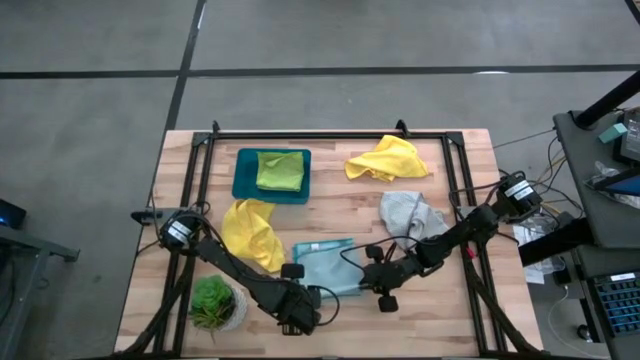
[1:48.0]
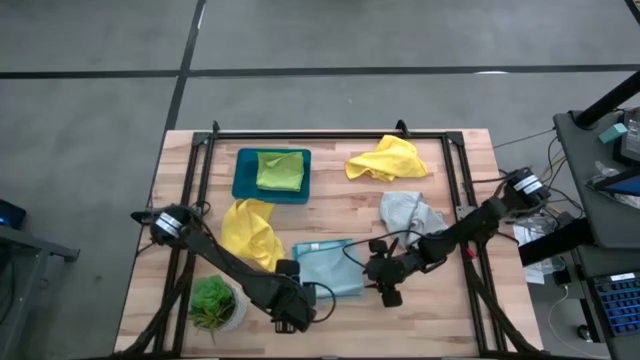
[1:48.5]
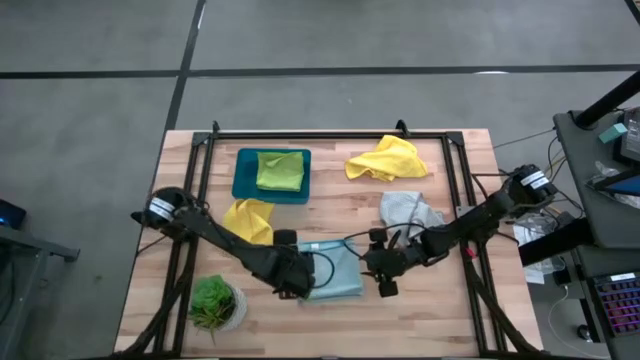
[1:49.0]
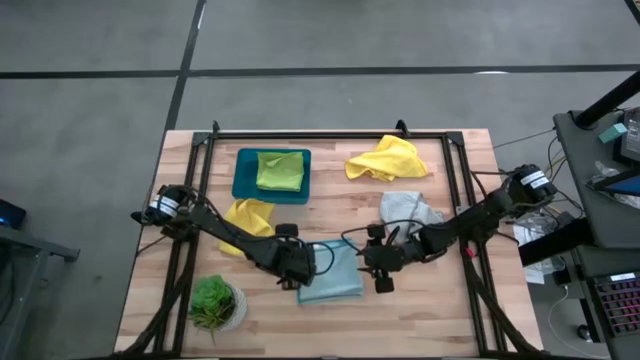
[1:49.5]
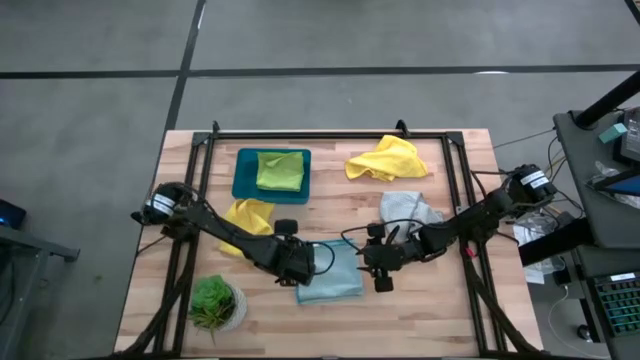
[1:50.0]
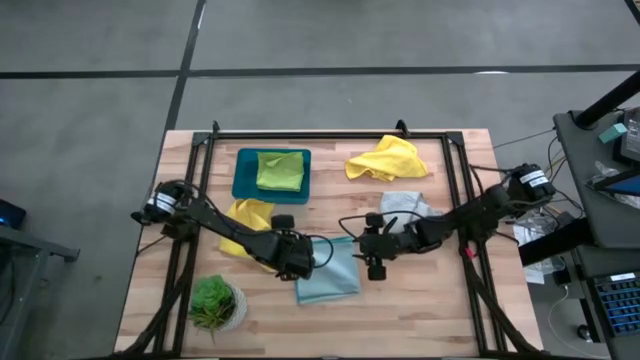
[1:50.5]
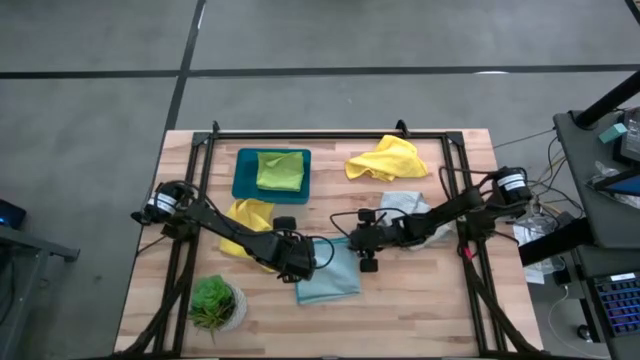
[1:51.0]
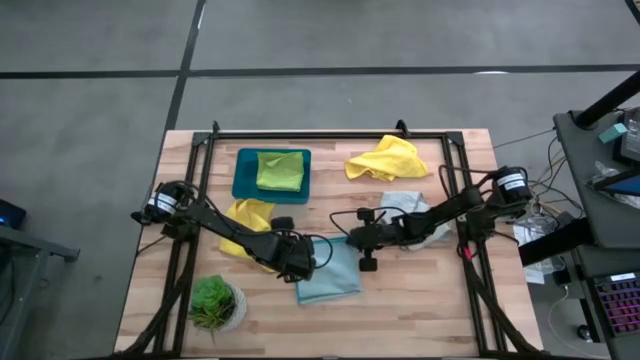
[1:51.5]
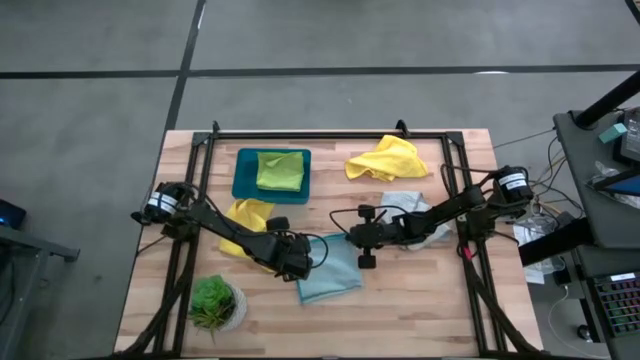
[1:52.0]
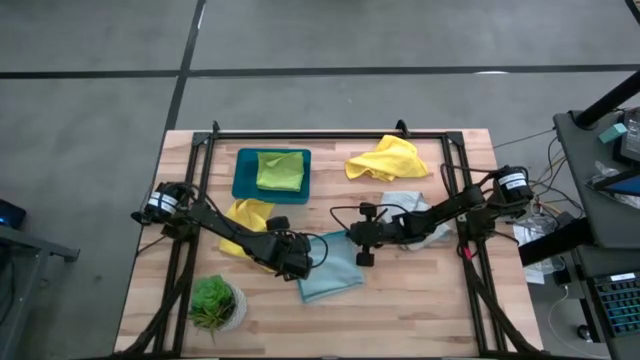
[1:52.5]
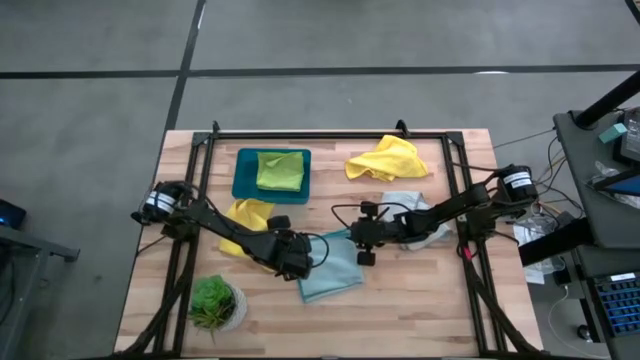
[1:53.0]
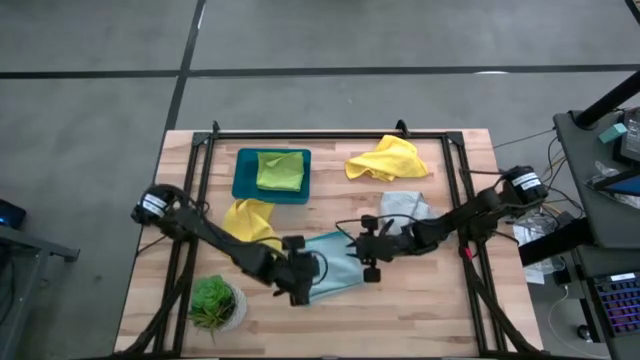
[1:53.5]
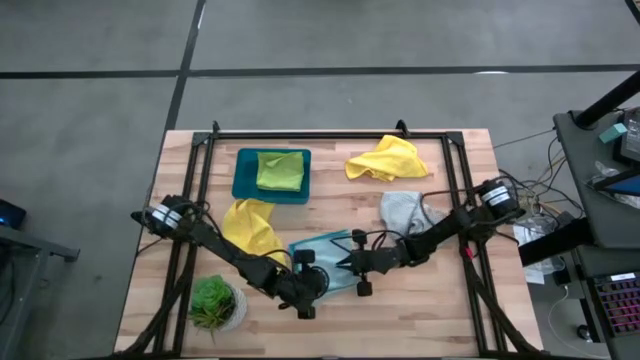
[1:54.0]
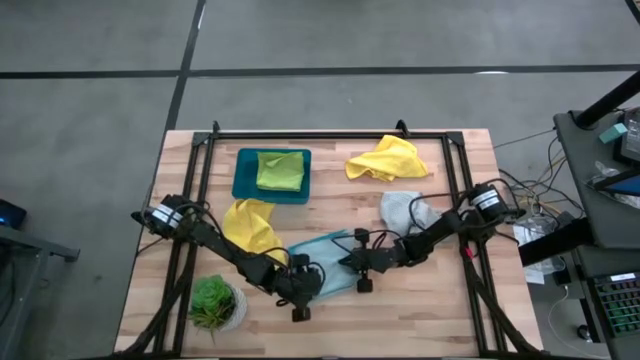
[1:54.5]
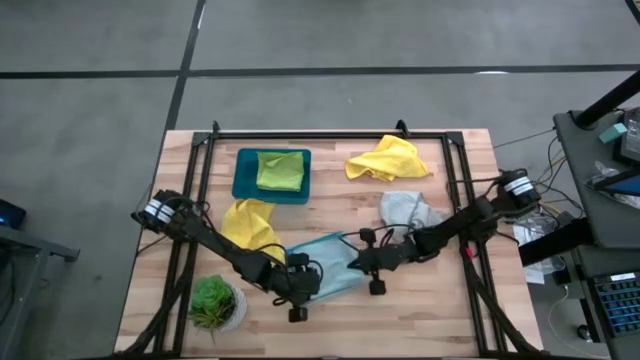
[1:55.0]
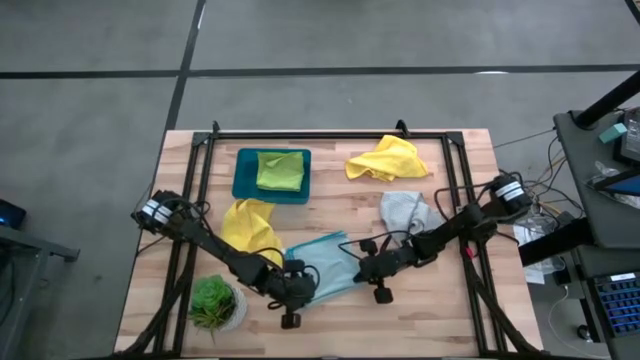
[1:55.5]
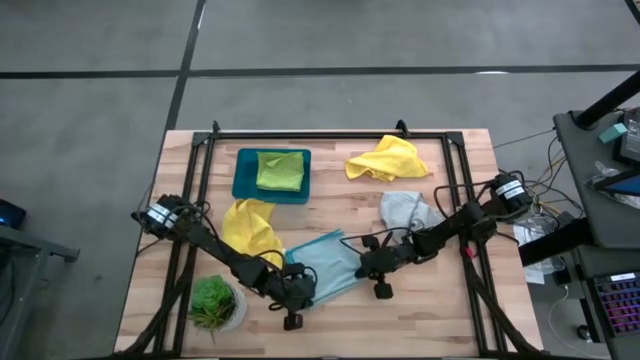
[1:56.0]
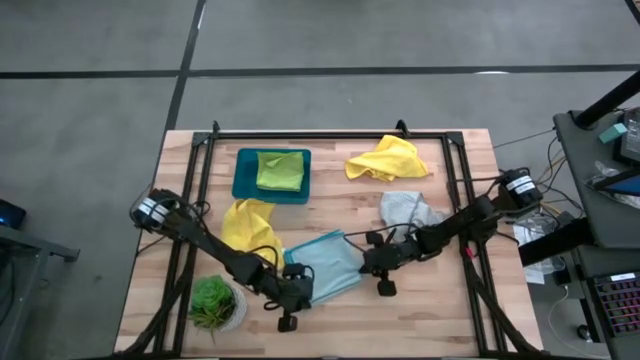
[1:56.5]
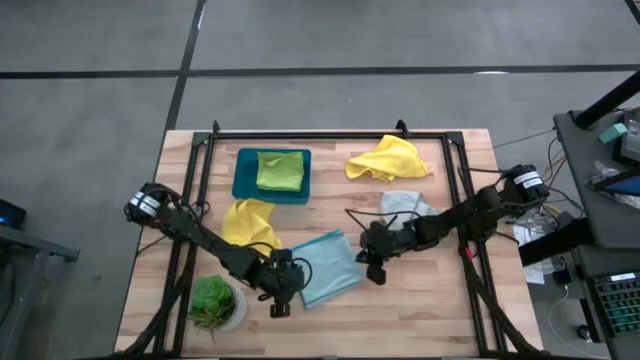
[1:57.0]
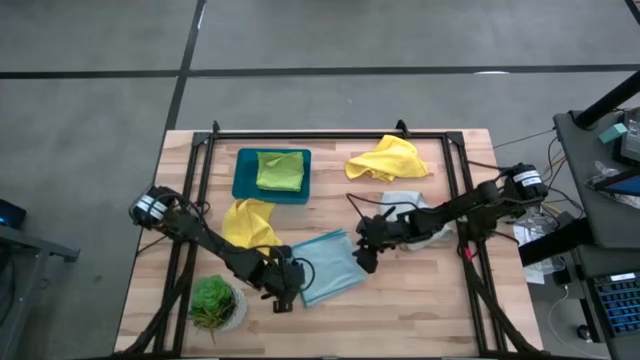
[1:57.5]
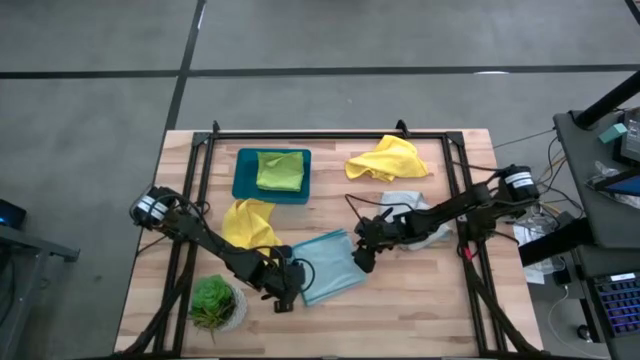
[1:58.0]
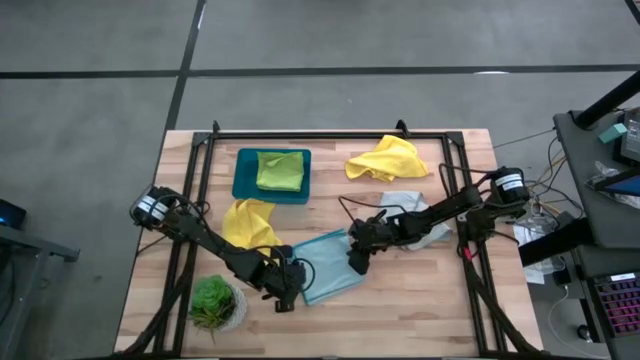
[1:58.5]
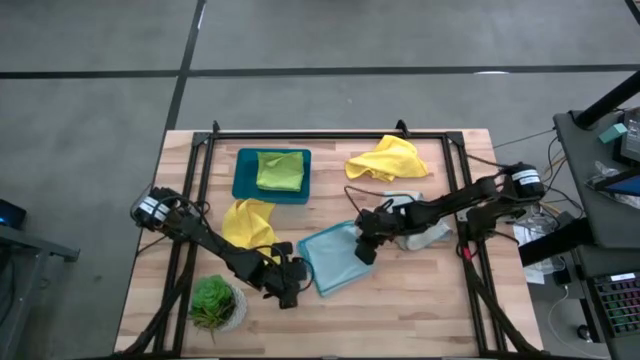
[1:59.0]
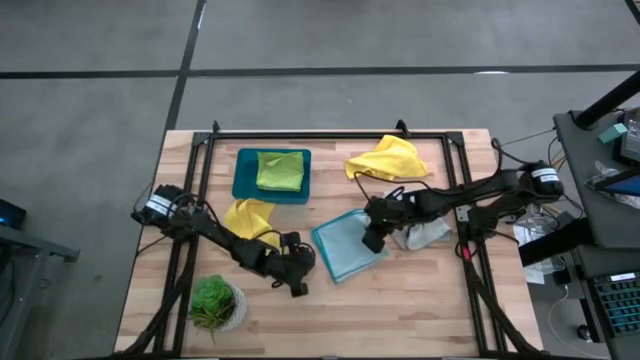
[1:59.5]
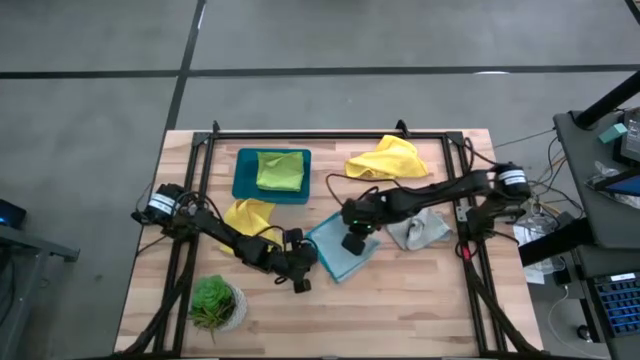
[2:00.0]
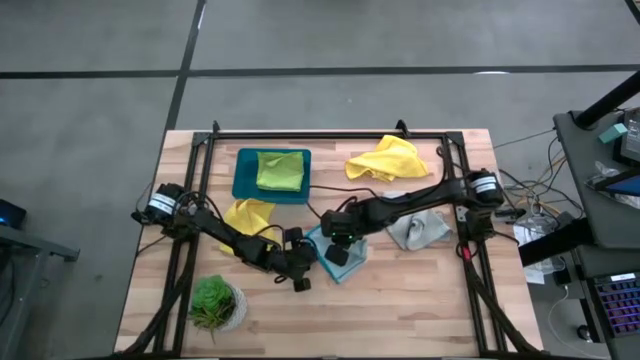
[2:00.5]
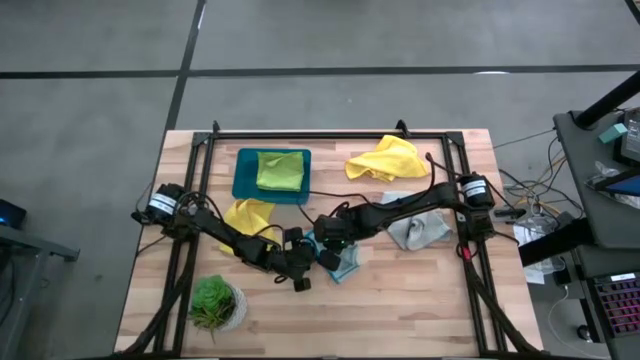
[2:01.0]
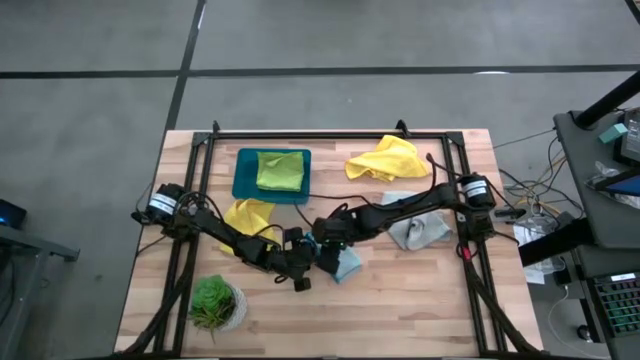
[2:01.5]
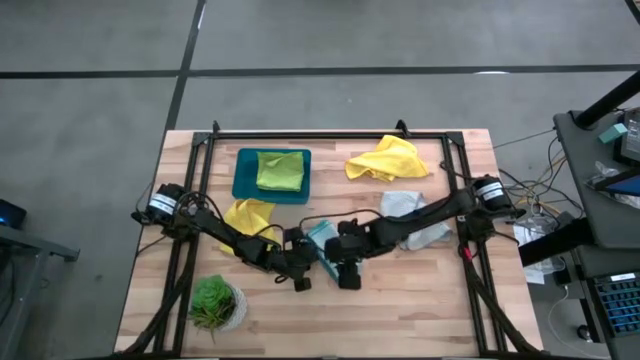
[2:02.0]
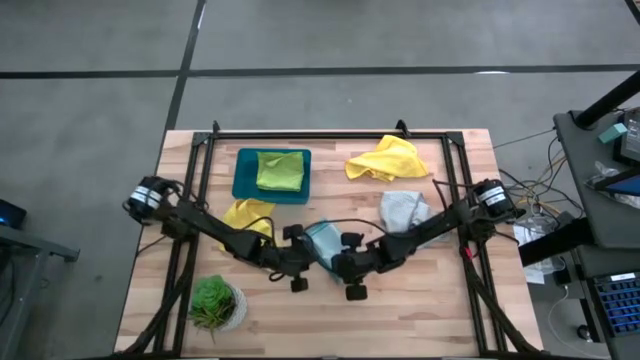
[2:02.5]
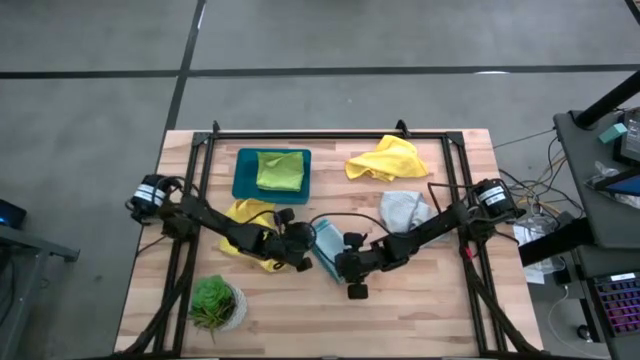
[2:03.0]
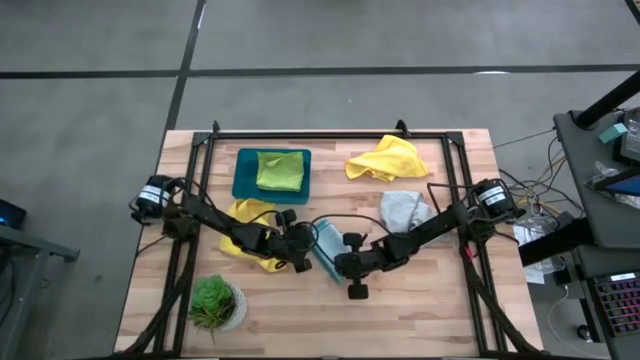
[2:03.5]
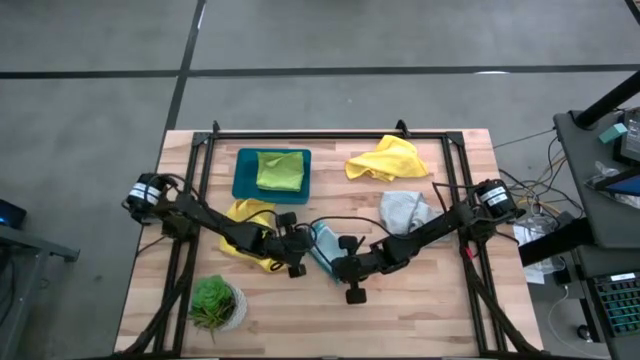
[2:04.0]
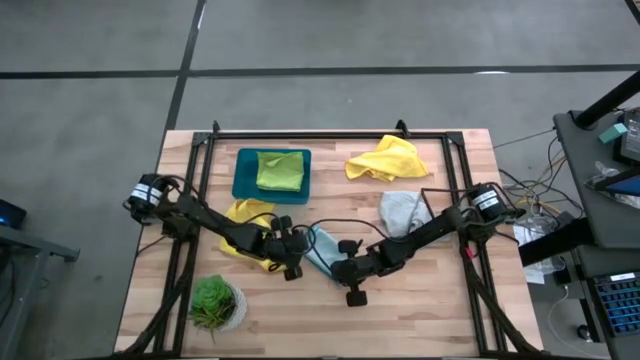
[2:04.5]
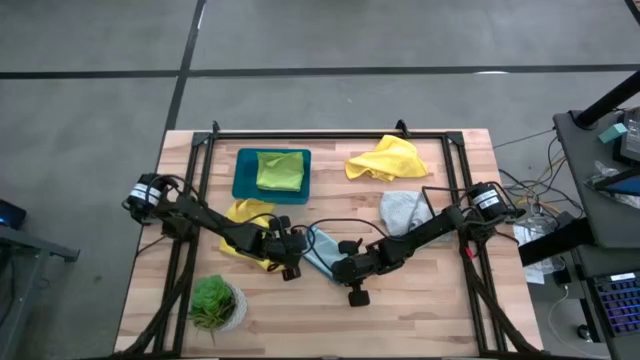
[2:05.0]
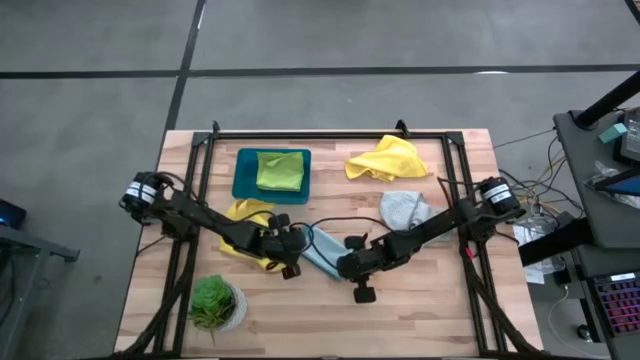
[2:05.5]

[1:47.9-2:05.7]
Task: Fold microfiber towels
Fold the blue microfiber towel

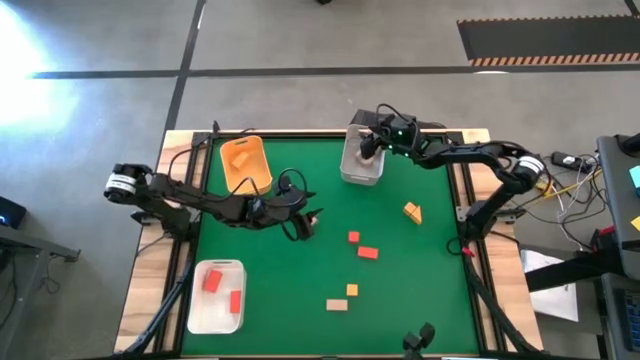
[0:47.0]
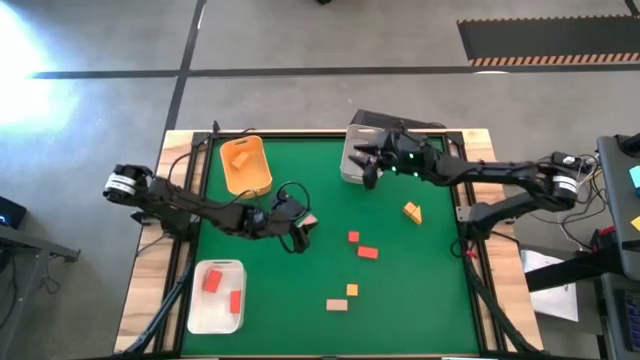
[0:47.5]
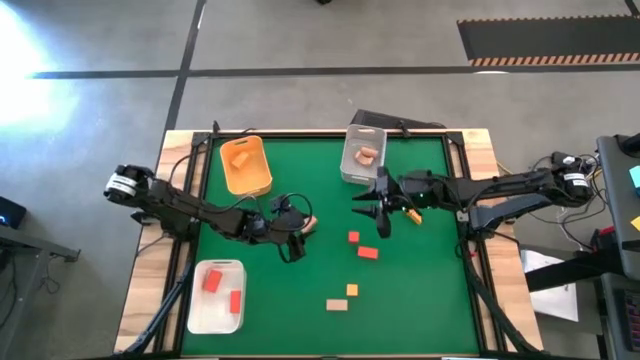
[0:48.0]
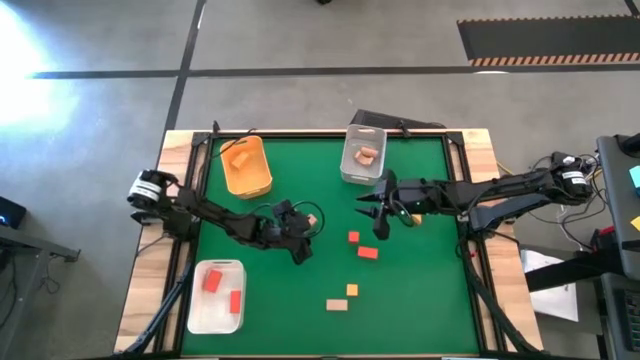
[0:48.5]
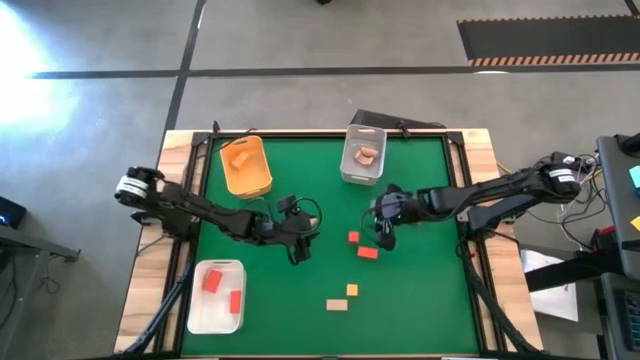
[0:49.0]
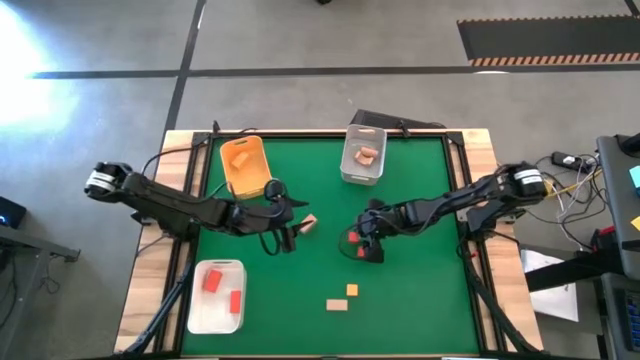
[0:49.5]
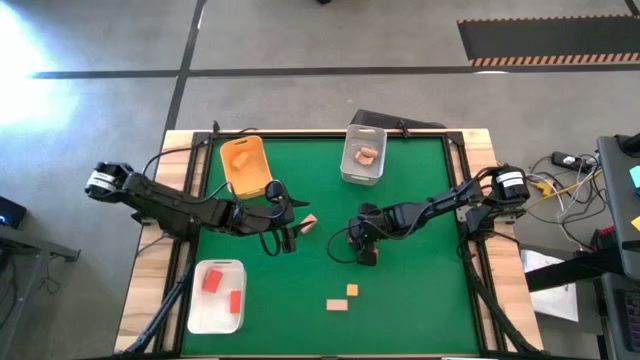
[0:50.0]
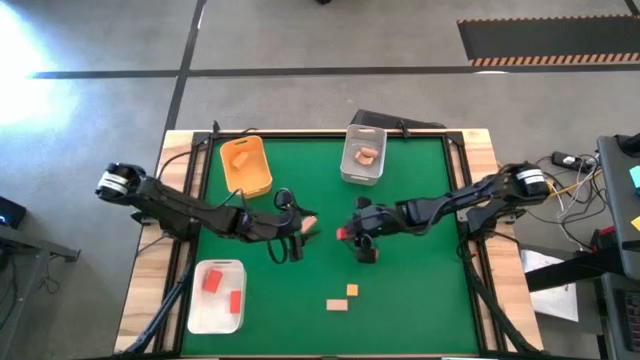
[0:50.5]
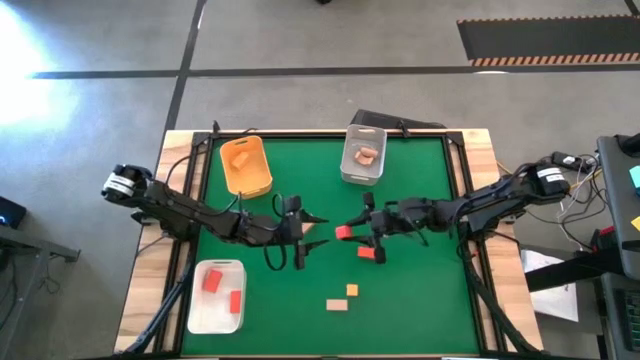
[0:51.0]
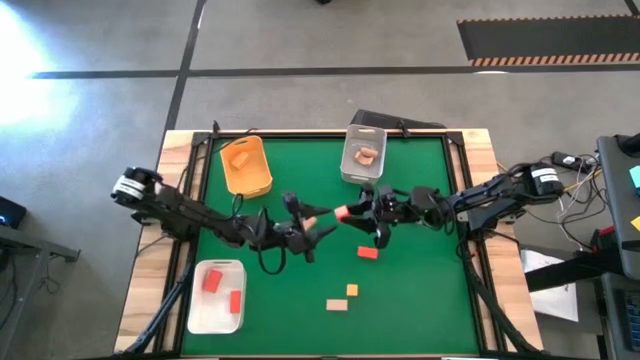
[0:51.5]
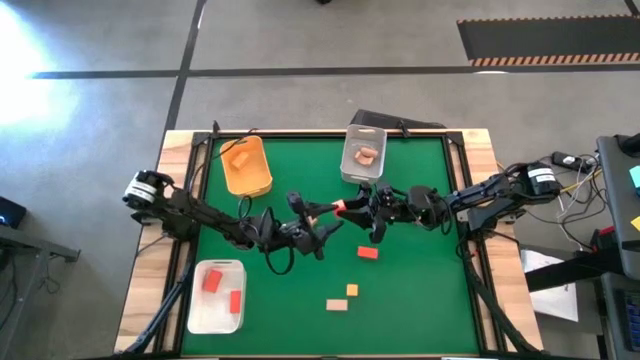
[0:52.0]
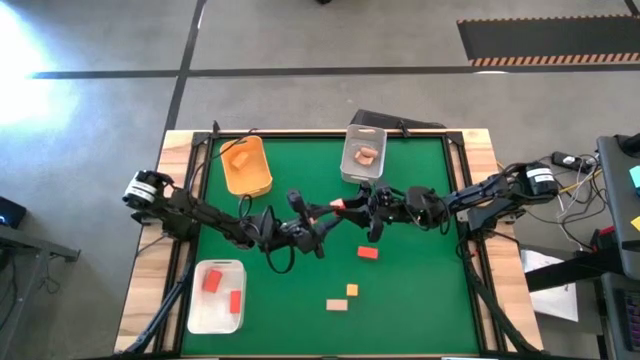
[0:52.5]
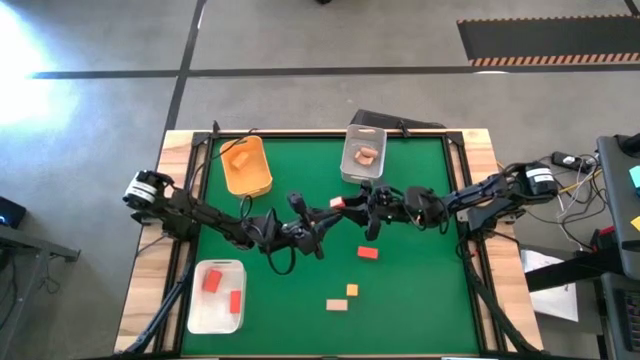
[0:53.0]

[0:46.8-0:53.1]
Task: Sort & place blocks by color
Put the orange block into the white bin
